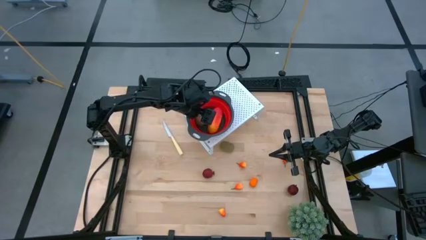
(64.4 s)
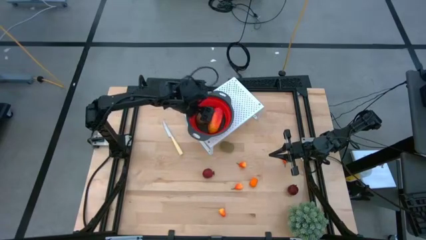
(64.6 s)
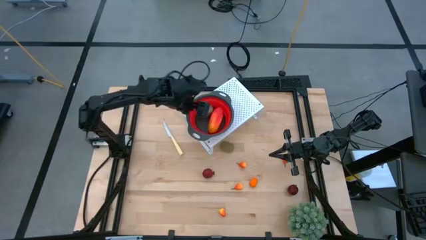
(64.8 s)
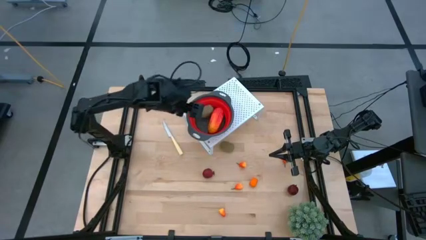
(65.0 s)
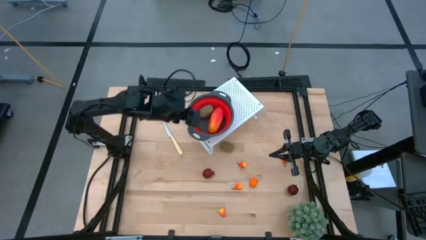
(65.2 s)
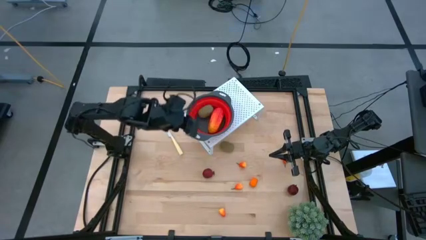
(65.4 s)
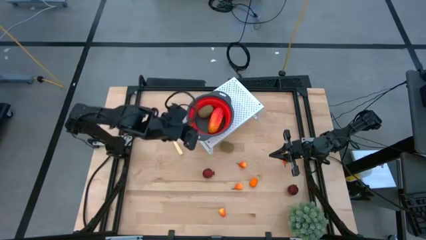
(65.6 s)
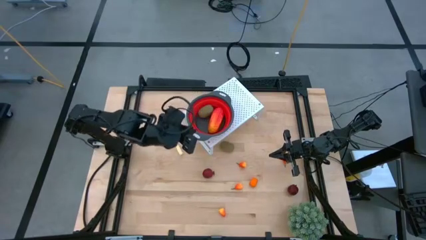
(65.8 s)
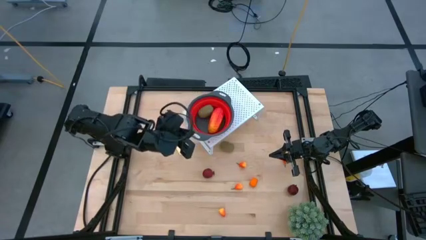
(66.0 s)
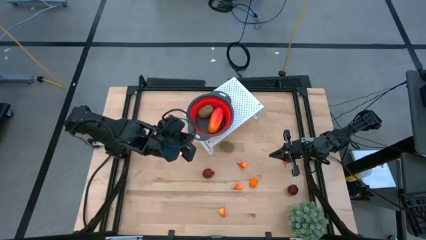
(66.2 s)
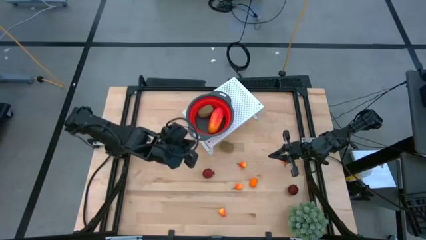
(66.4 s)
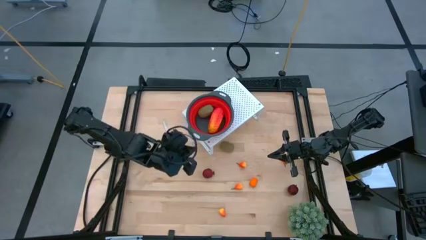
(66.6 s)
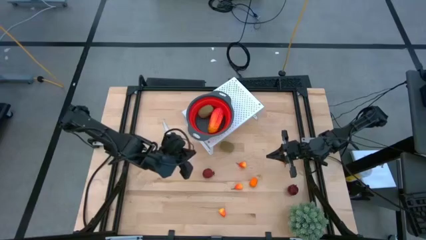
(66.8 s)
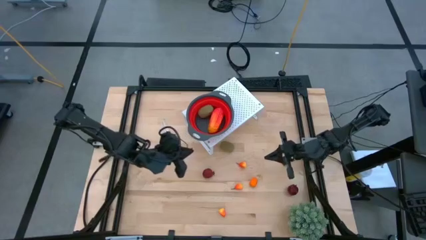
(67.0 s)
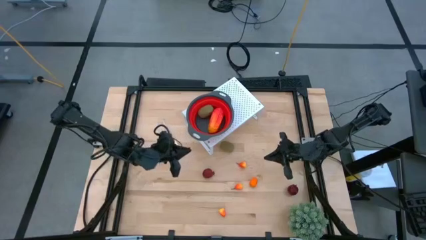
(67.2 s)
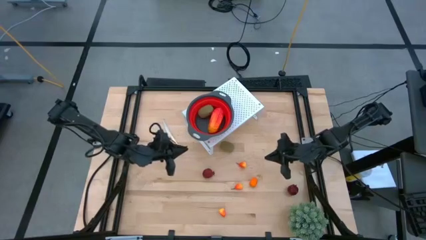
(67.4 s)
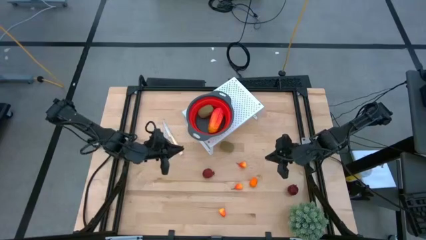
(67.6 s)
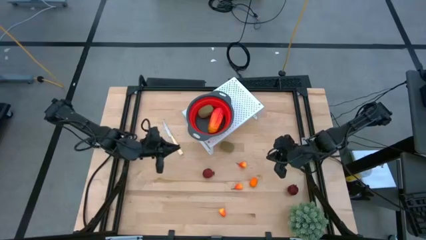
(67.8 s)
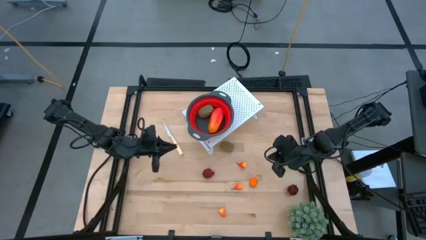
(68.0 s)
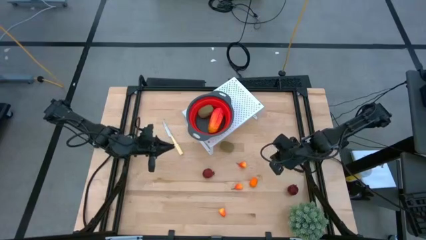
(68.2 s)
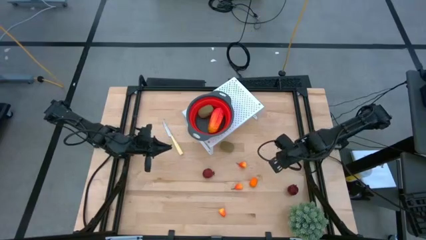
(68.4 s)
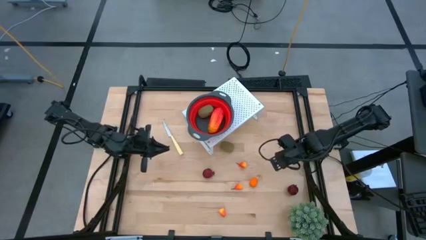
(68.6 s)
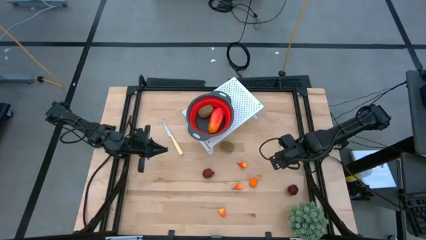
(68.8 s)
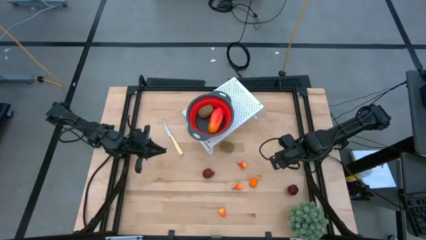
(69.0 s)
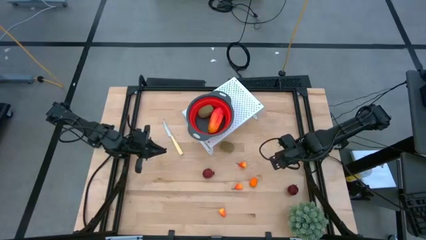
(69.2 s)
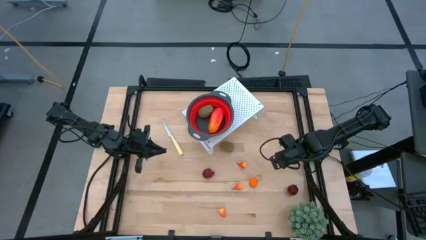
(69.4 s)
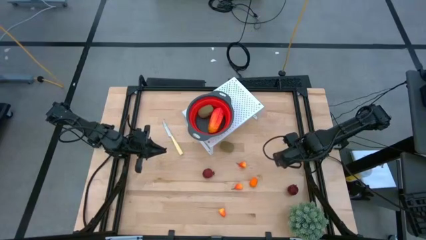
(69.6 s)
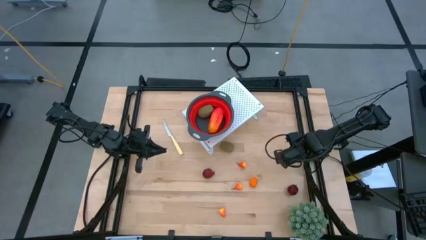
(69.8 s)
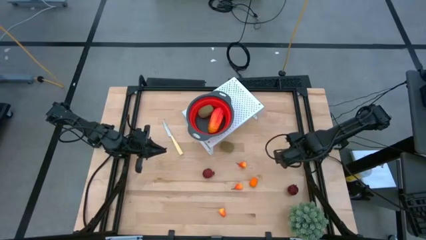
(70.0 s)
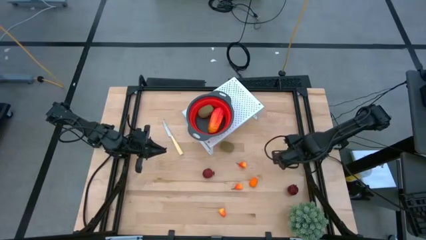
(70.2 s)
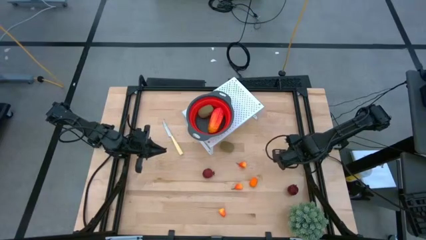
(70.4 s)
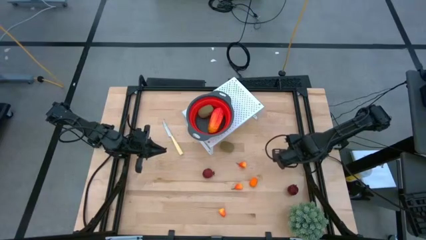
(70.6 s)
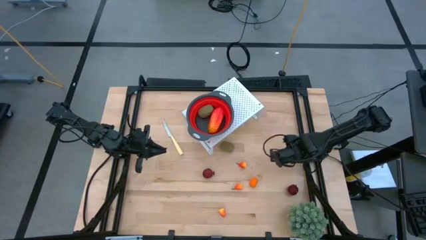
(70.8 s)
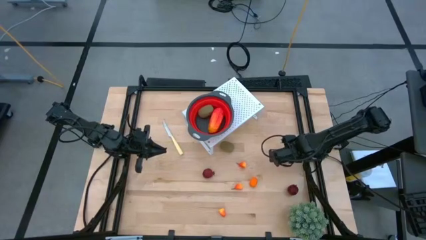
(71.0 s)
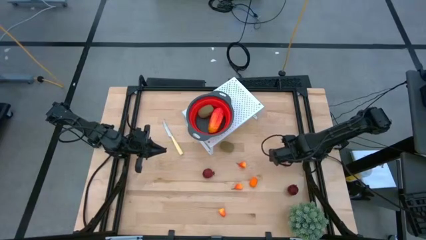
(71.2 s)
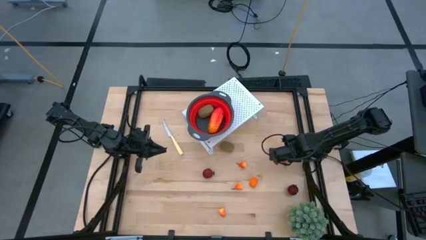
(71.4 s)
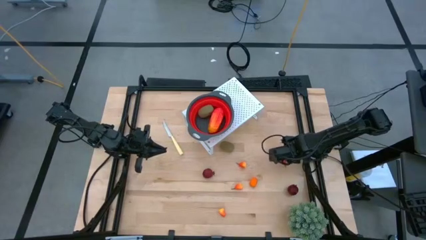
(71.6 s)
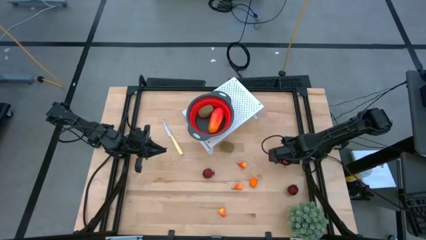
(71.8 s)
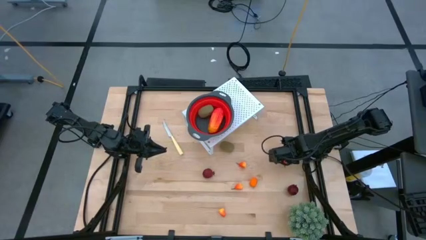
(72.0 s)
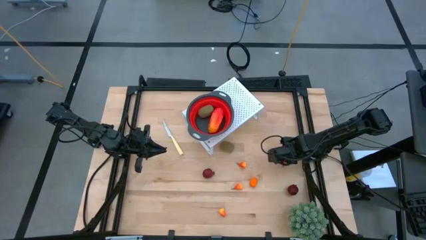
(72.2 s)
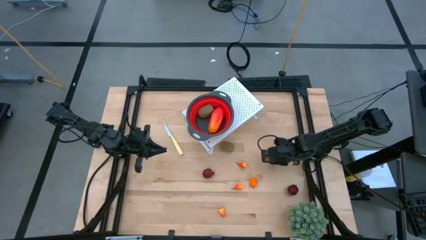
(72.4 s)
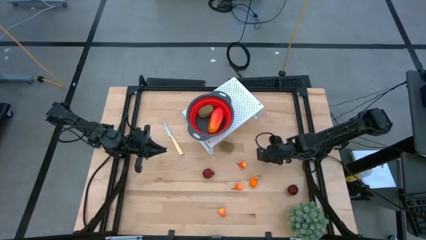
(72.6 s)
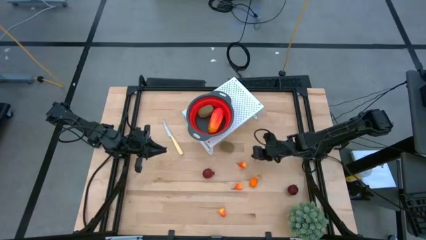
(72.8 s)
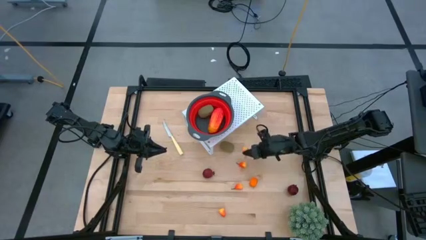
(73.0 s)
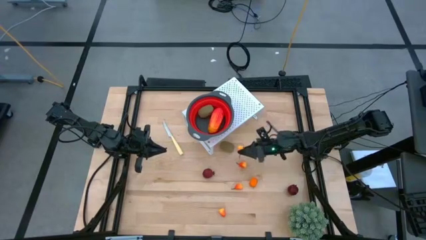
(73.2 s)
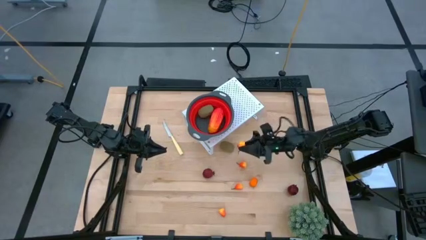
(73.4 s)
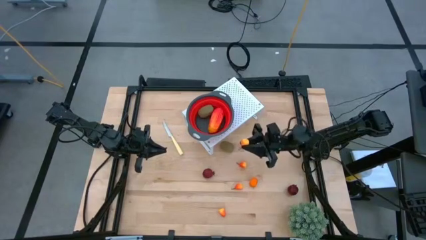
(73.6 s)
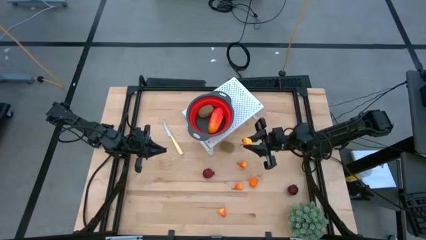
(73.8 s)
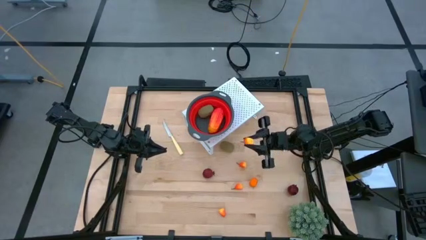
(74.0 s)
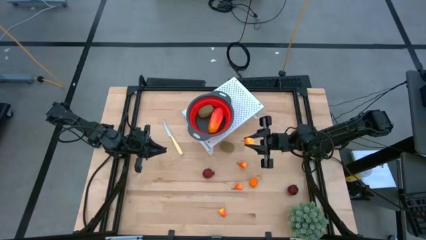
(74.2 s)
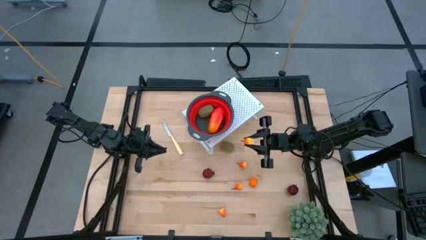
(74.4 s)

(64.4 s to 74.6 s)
Task: Pick & Place Fruit
Put the peach into the red strainer bowl on the shelf
